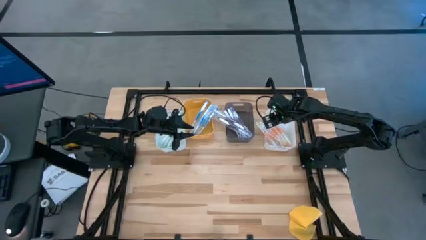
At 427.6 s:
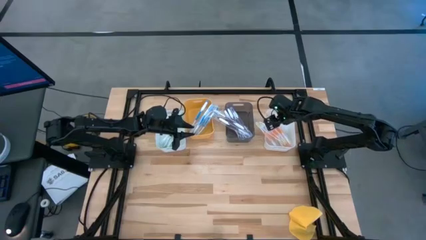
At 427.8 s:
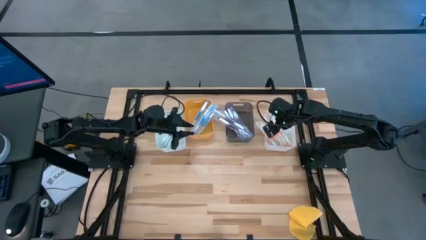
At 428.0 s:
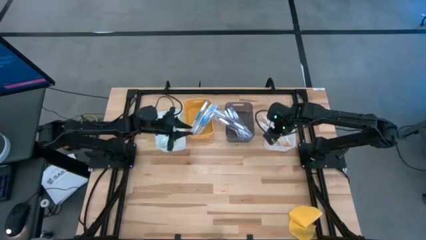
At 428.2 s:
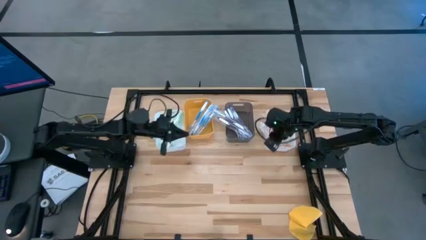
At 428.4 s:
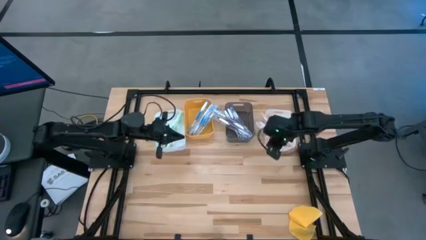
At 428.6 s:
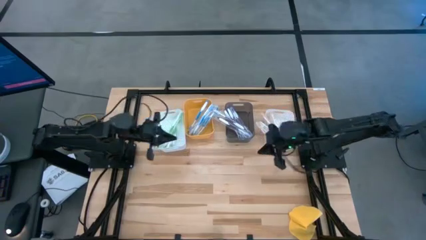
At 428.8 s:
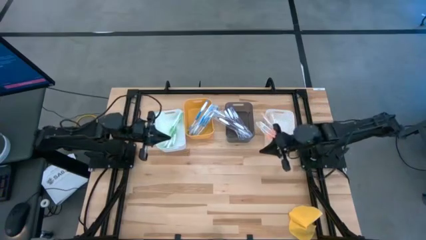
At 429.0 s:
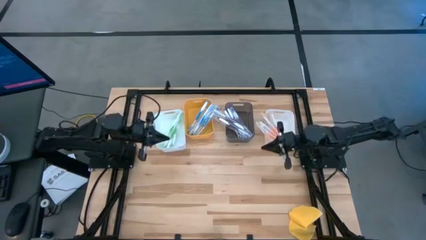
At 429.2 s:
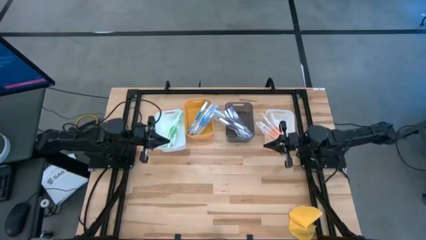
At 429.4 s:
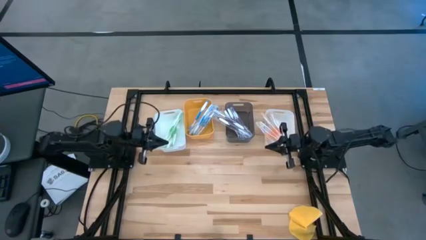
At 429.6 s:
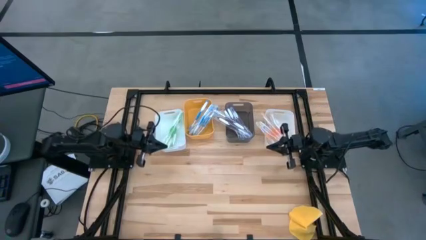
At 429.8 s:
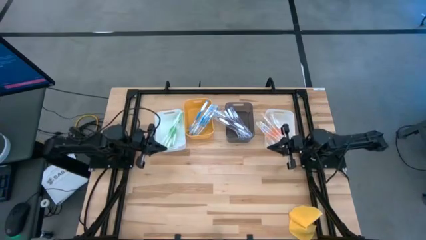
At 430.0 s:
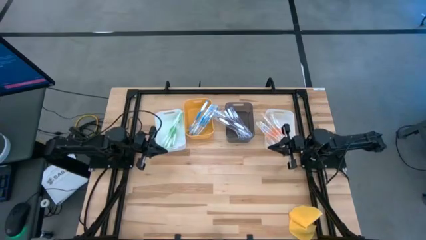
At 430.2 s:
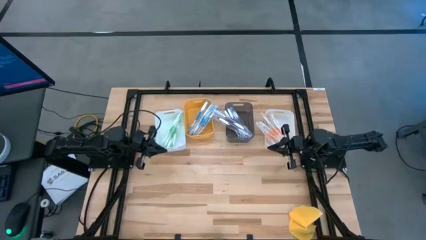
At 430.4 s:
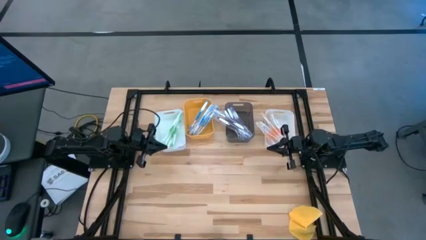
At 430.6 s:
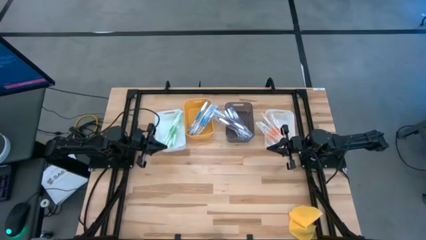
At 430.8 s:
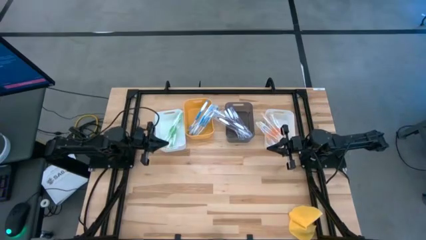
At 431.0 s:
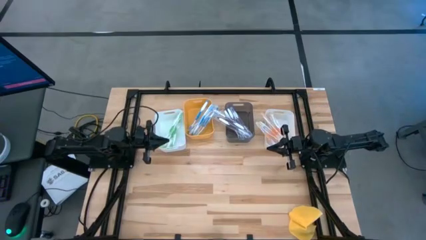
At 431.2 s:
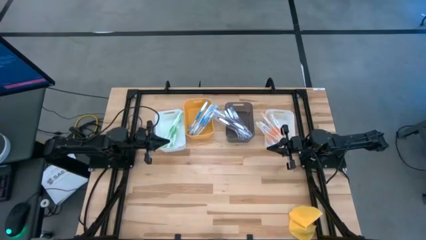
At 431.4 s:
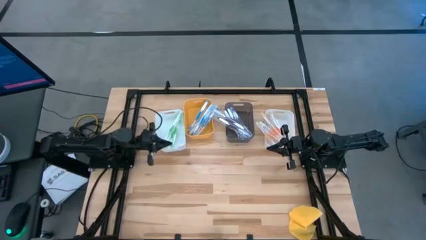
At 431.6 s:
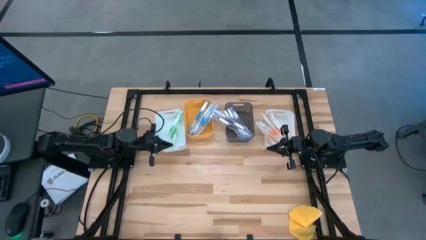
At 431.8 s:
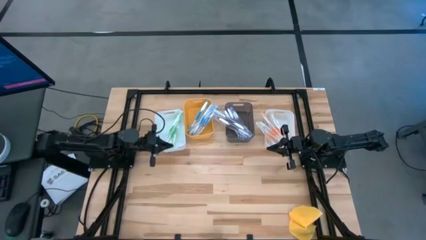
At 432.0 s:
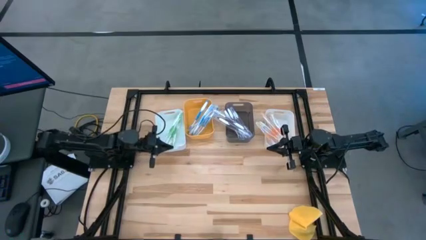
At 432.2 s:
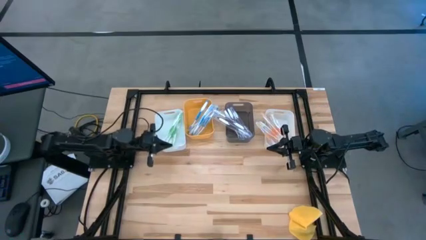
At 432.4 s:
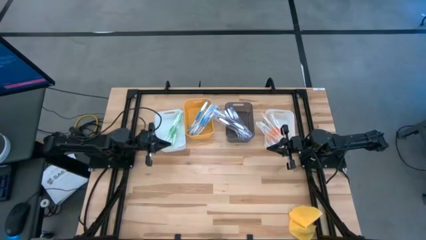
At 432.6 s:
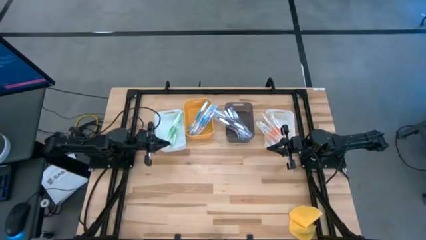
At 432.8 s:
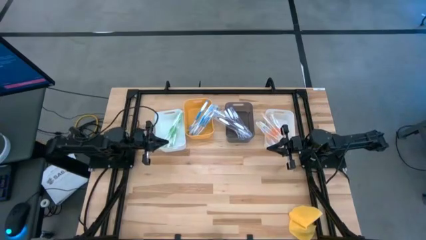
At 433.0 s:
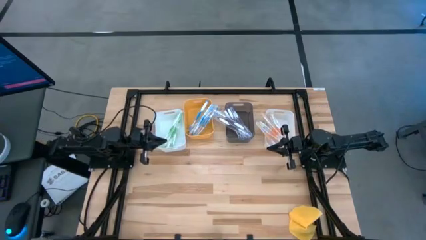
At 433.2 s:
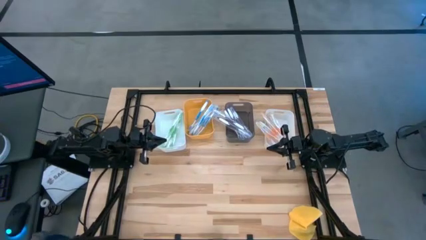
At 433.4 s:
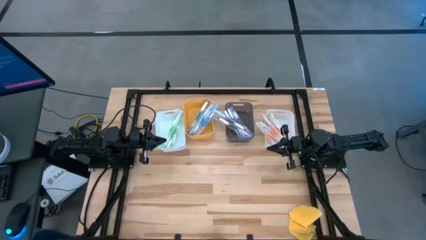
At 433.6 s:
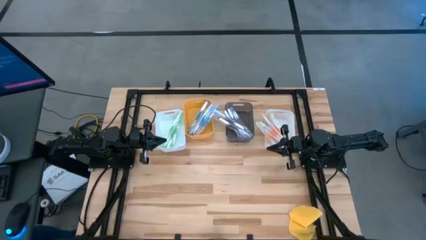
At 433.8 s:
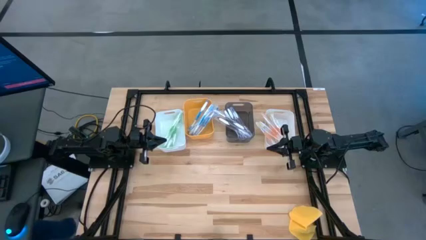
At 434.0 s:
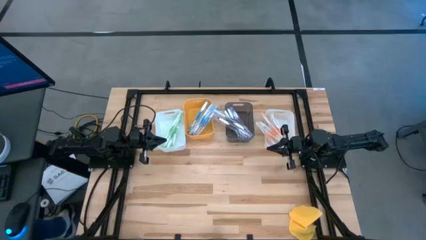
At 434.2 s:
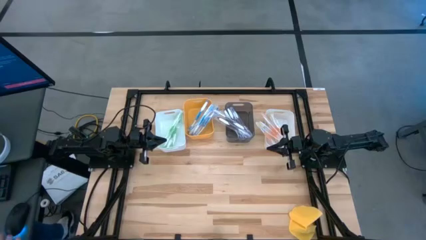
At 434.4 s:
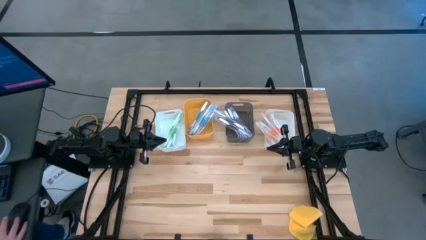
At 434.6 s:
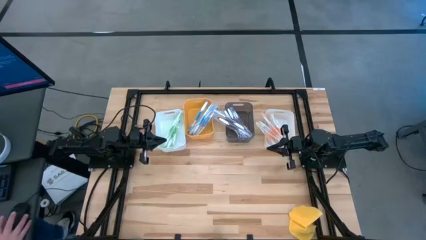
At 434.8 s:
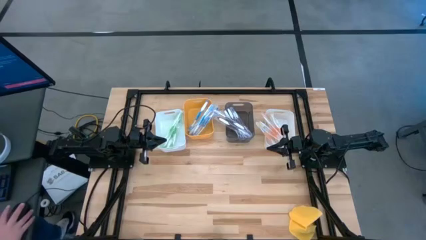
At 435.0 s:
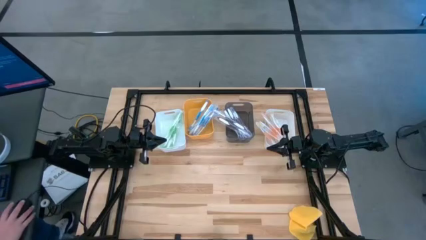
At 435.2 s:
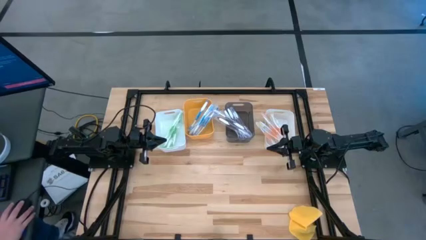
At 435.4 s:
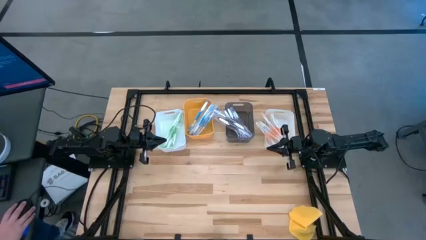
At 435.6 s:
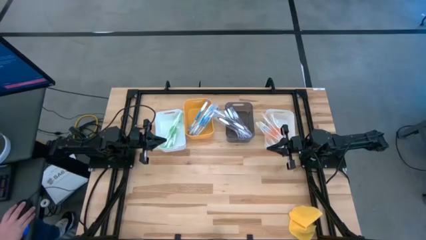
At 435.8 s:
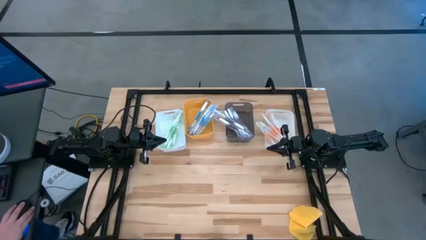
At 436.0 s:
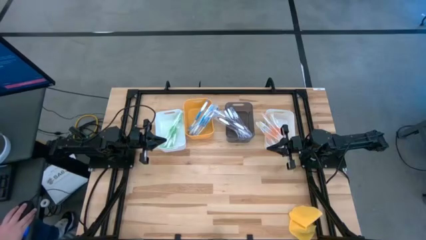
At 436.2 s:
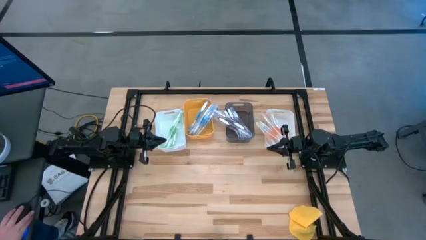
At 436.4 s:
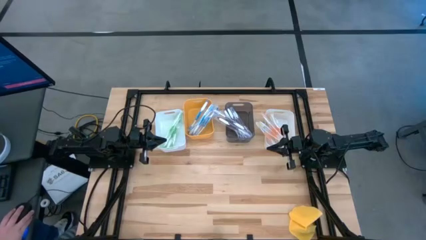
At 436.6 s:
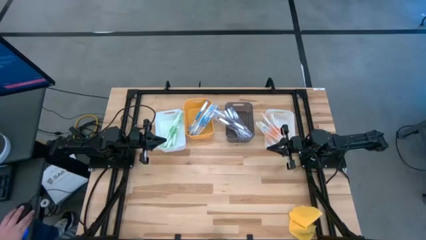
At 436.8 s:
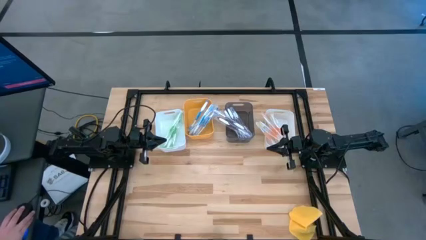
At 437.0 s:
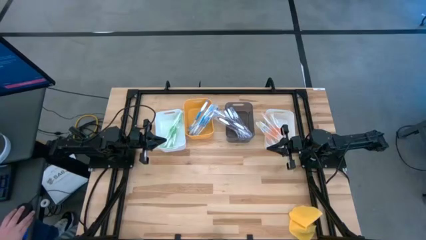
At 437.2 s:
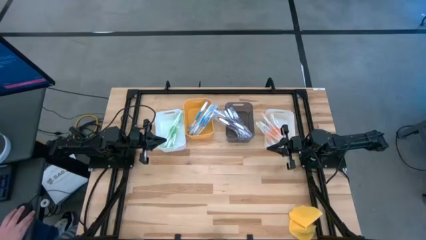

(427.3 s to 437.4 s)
Task: Pick & Place Toothbrushes
Return to Home Position

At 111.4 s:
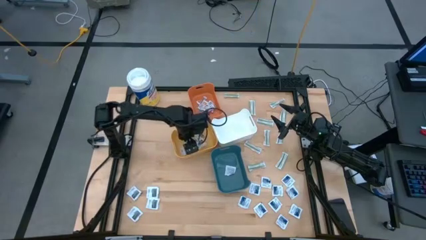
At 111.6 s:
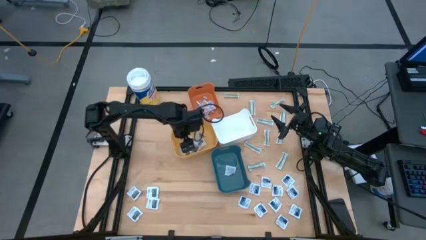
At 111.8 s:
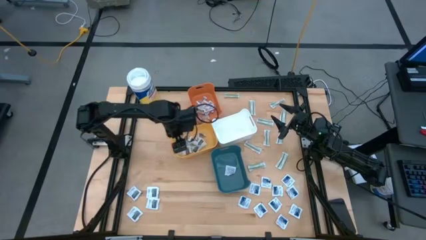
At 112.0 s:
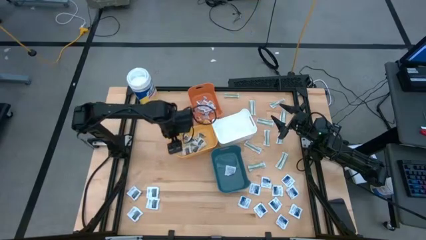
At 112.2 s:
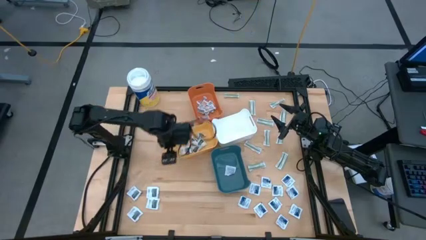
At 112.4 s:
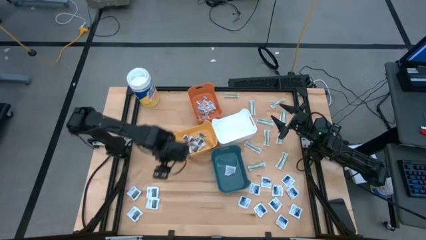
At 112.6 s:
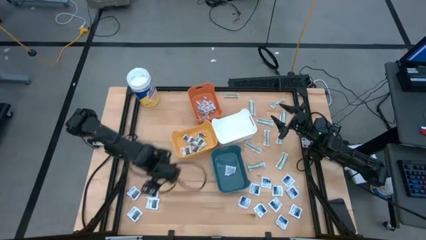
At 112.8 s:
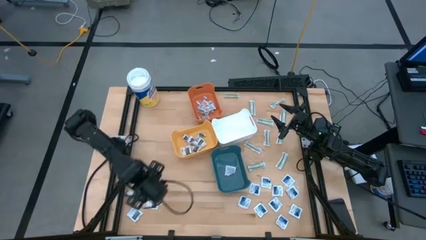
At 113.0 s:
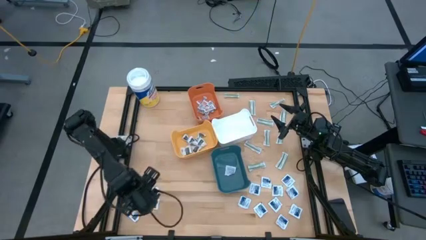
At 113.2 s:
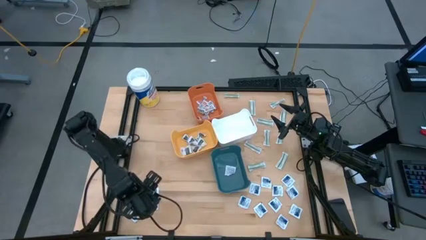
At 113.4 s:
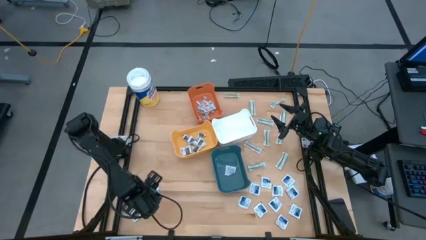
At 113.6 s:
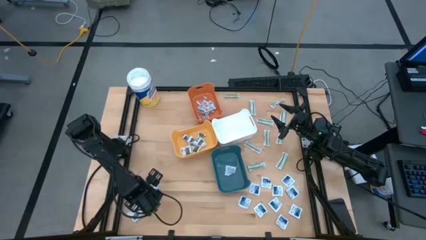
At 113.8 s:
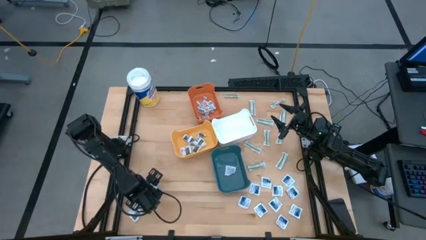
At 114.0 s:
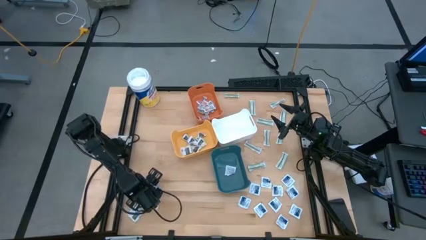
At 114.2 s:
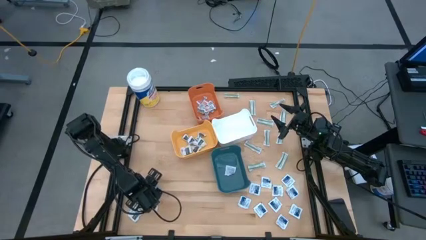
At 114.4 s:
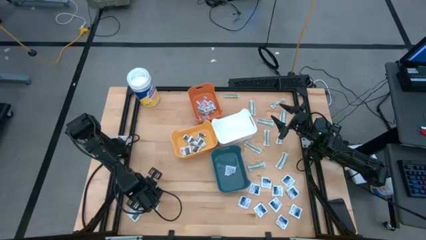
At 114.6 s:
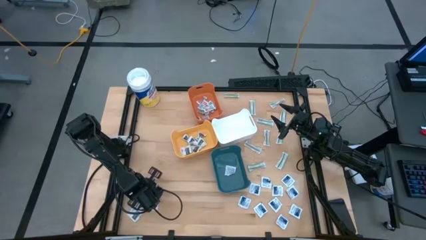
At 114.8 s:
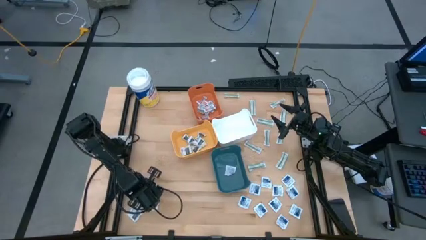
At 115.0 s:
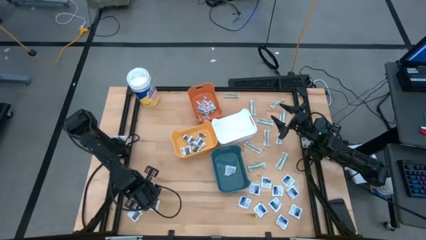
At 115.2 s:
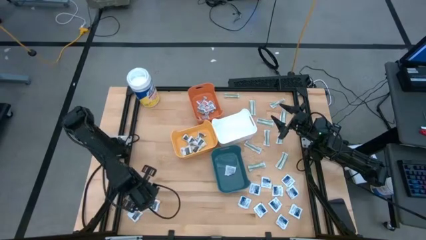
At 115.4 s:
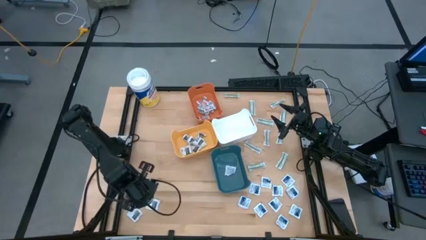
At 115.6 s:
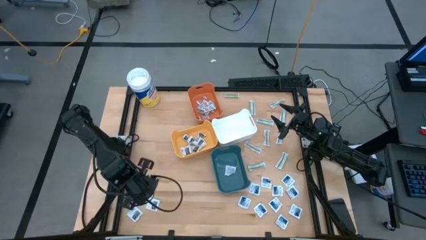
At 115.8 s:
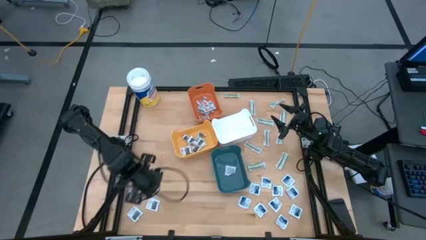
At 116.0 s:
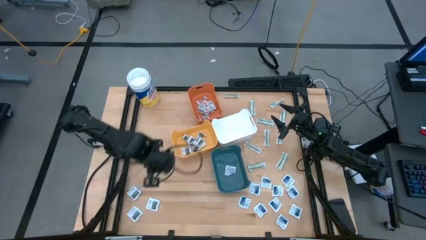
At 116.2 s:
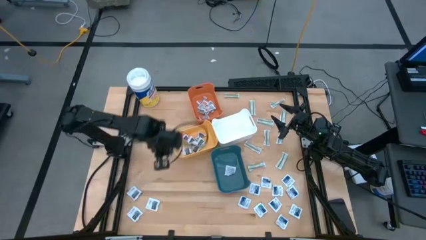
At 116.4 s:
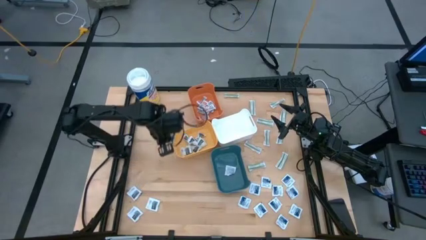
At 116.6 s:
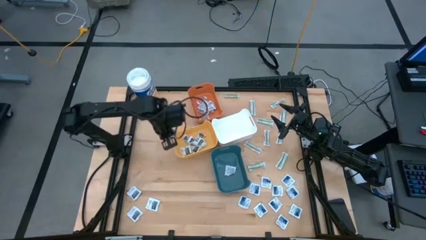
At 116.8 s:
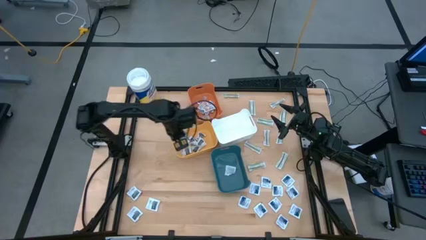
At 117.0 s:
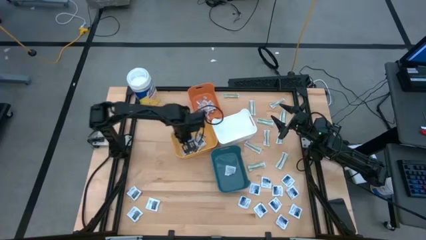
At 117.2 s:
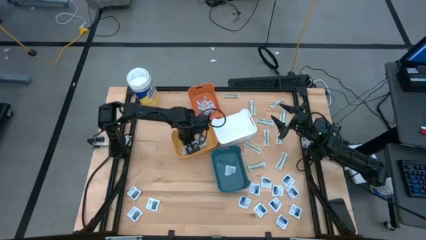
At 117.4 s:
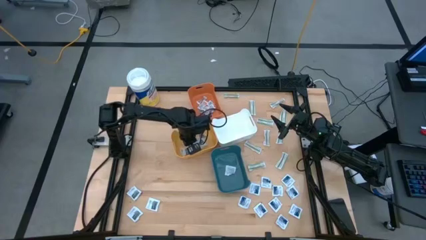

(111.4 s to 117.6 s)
Task: Pick & Place First Aid Supplies
Put the black towelette pack into the yellow bin
